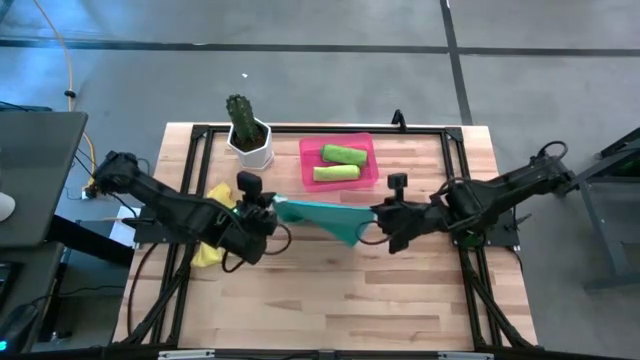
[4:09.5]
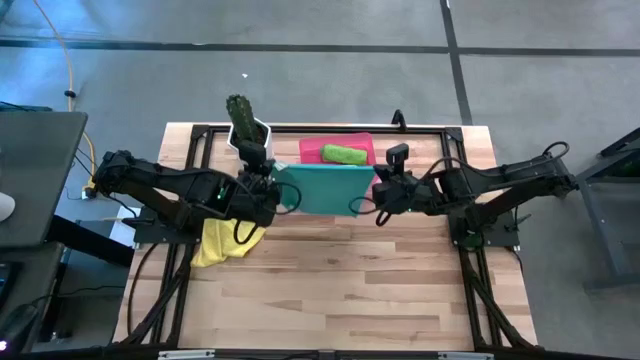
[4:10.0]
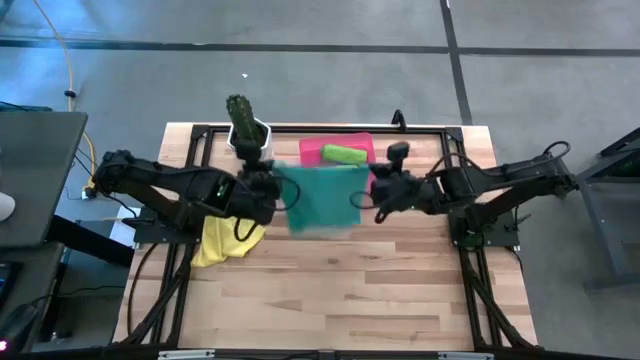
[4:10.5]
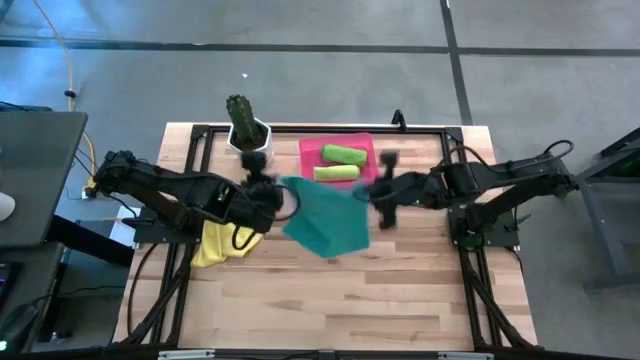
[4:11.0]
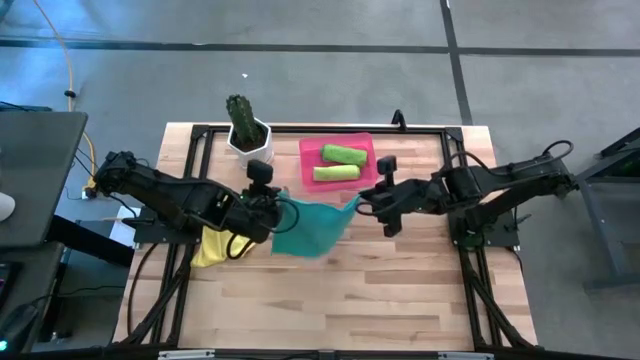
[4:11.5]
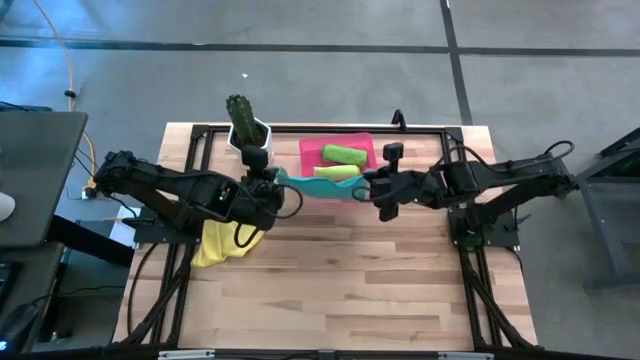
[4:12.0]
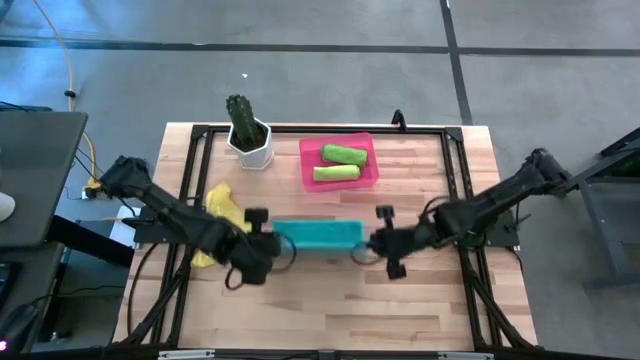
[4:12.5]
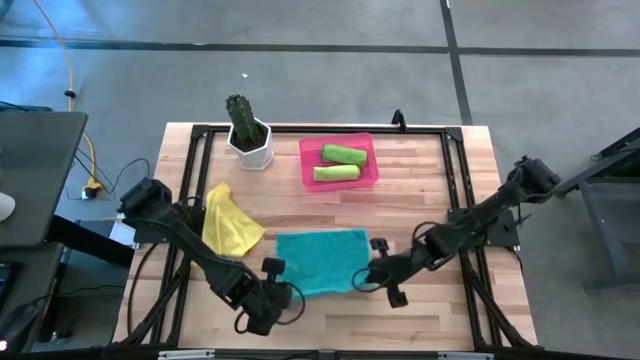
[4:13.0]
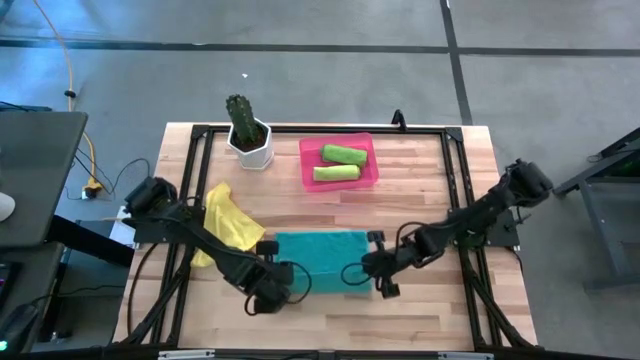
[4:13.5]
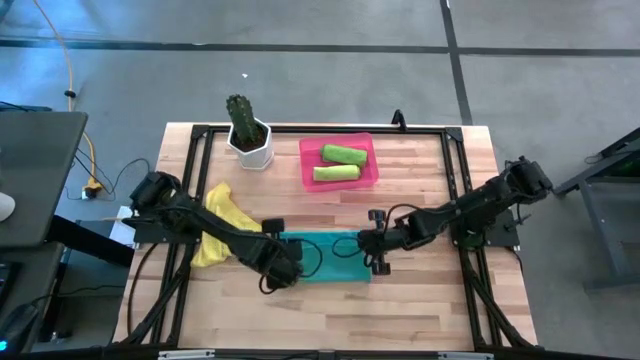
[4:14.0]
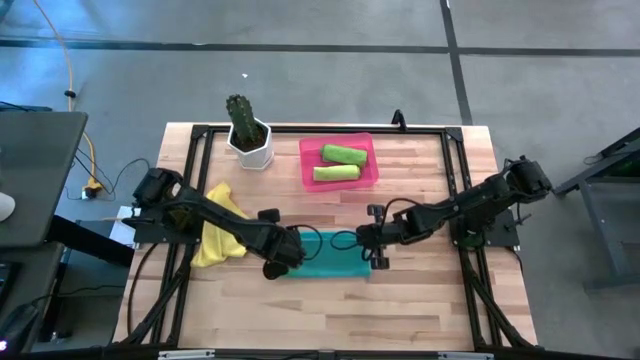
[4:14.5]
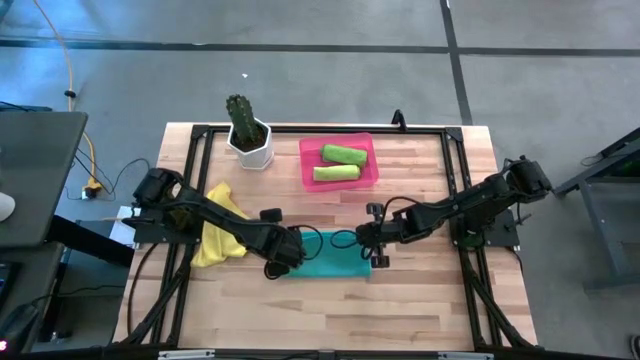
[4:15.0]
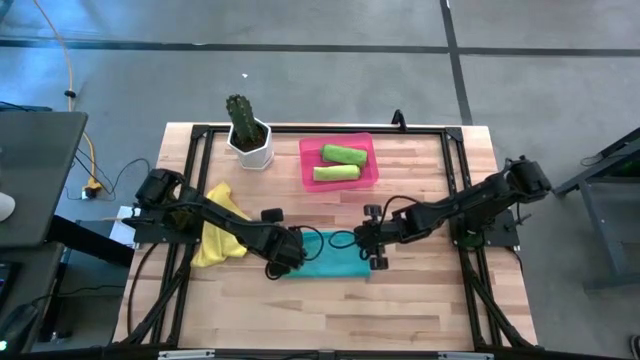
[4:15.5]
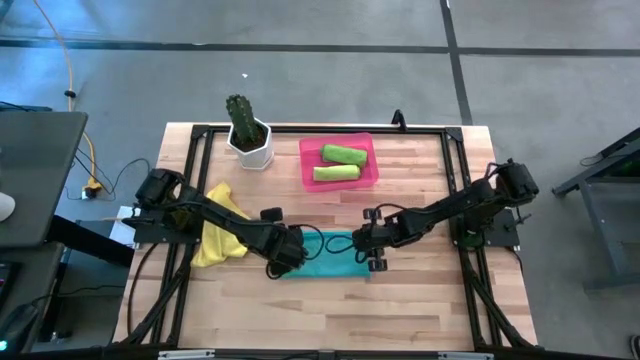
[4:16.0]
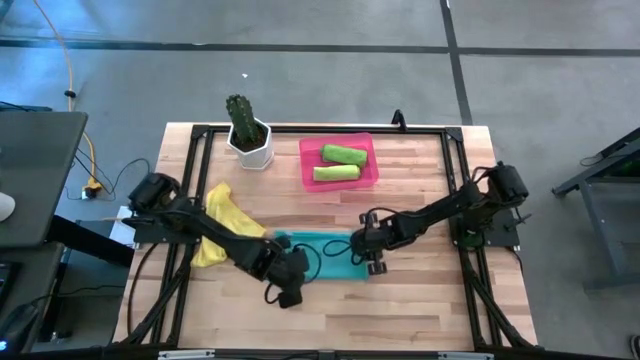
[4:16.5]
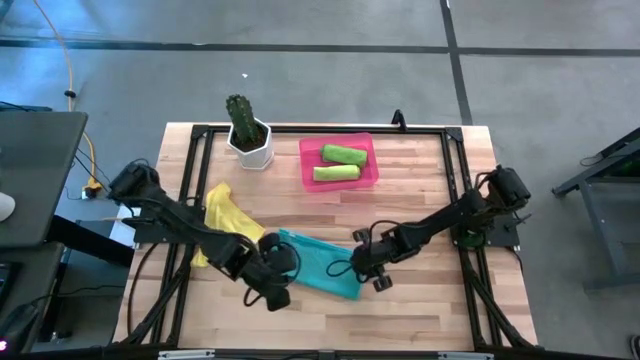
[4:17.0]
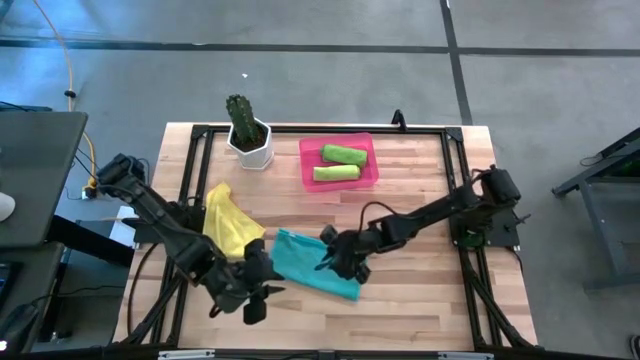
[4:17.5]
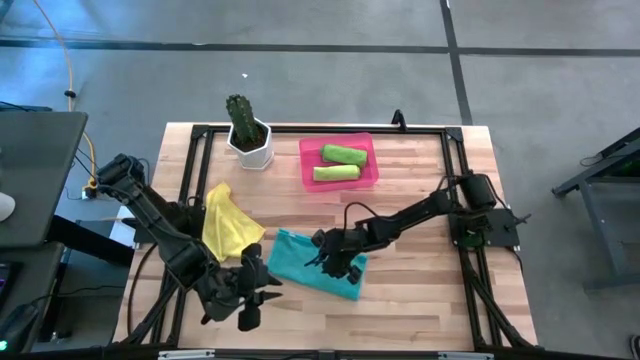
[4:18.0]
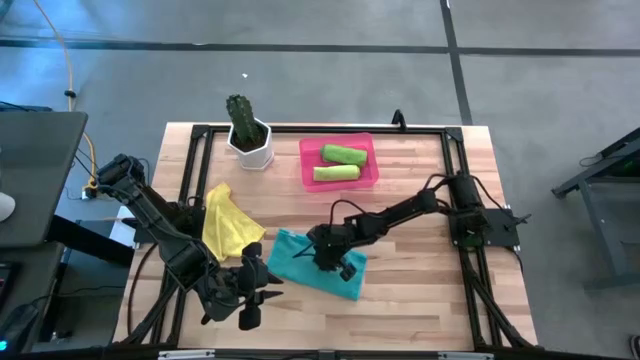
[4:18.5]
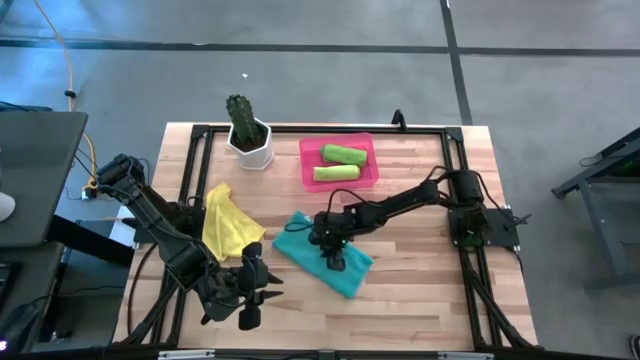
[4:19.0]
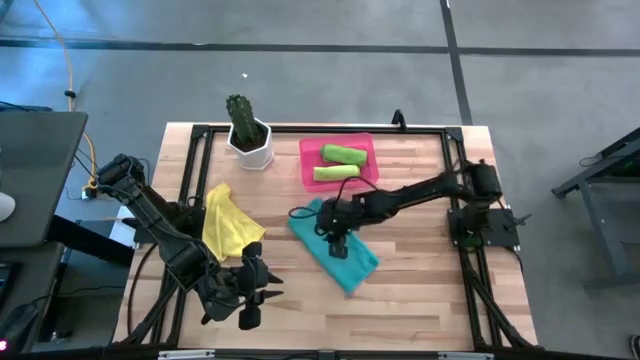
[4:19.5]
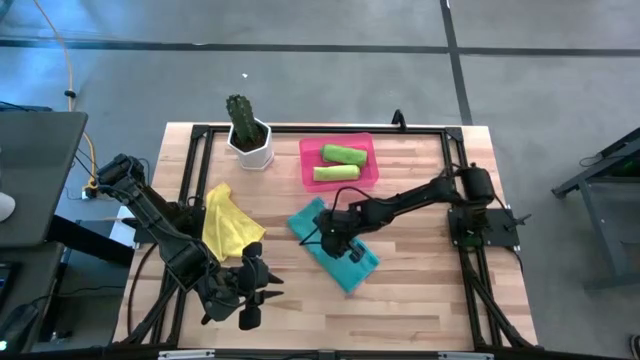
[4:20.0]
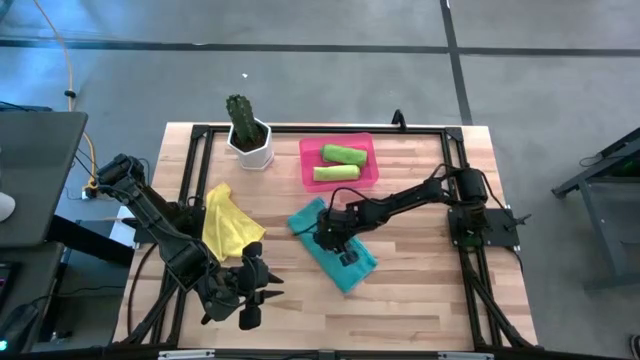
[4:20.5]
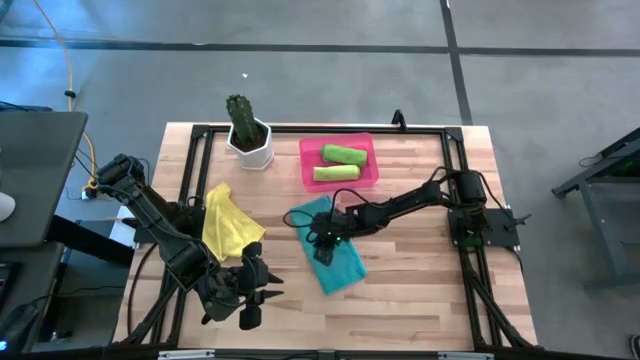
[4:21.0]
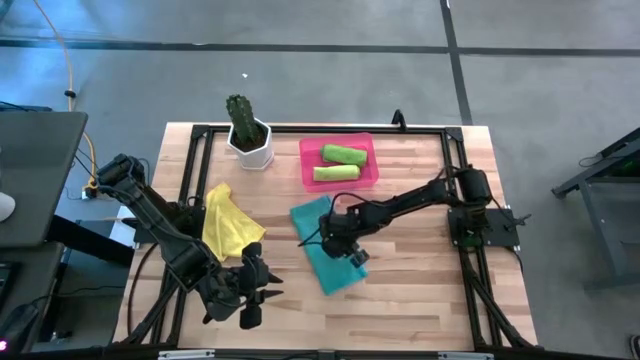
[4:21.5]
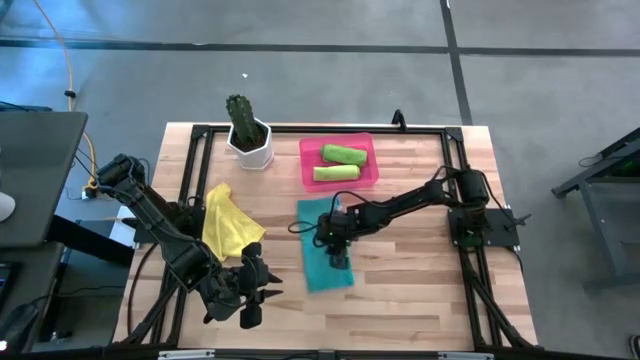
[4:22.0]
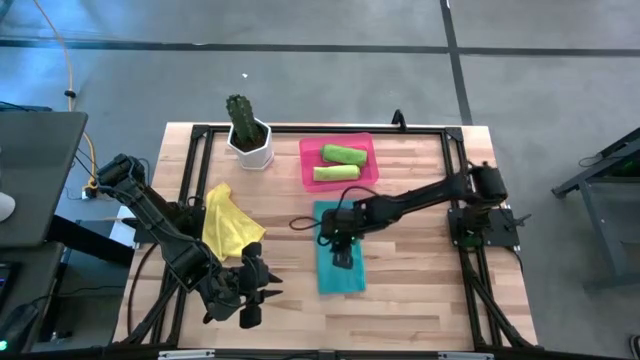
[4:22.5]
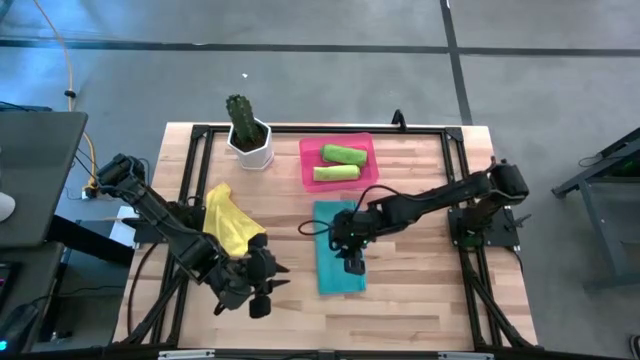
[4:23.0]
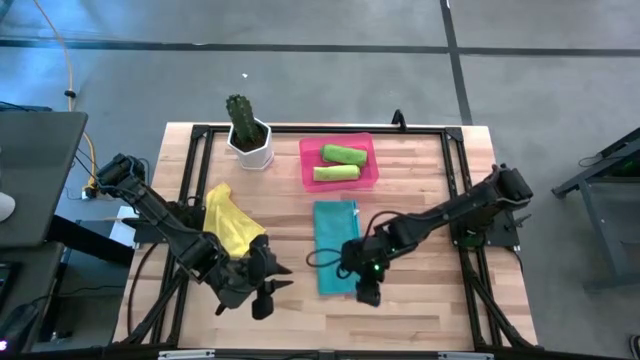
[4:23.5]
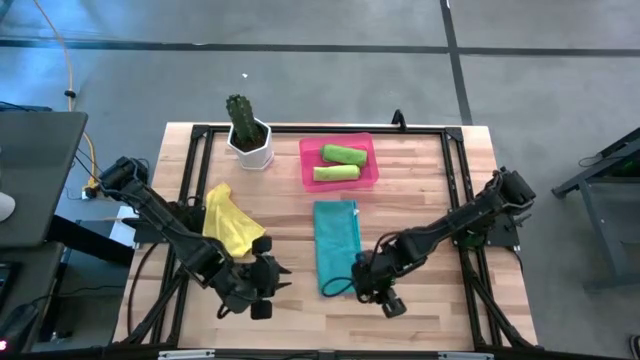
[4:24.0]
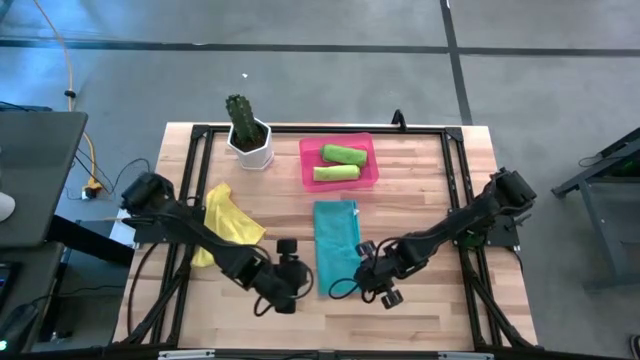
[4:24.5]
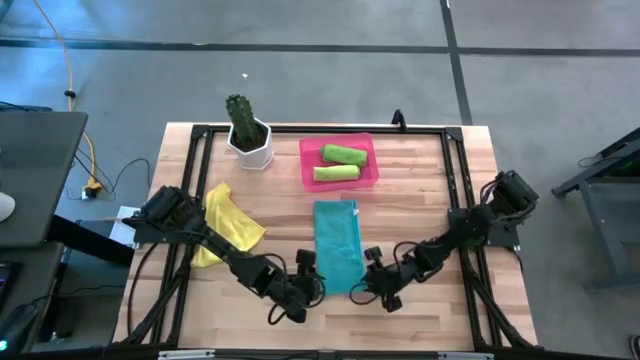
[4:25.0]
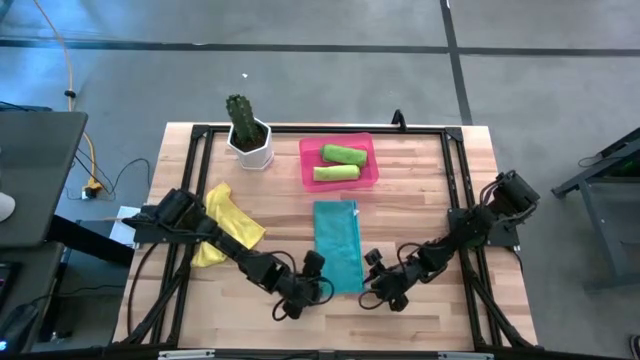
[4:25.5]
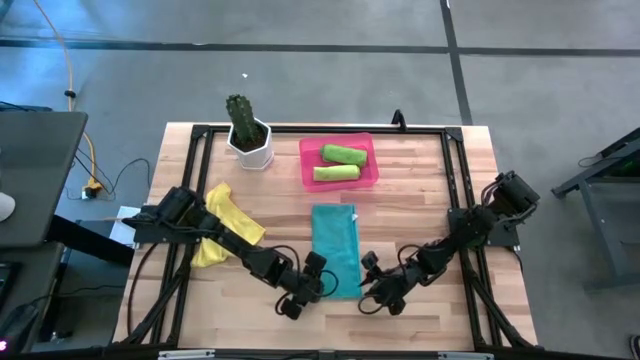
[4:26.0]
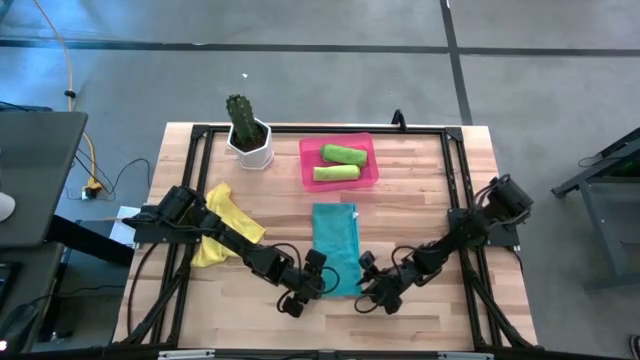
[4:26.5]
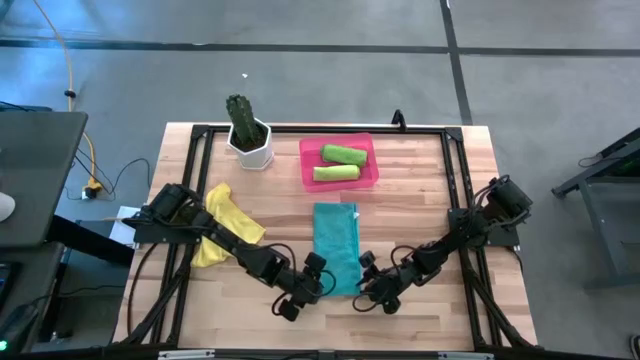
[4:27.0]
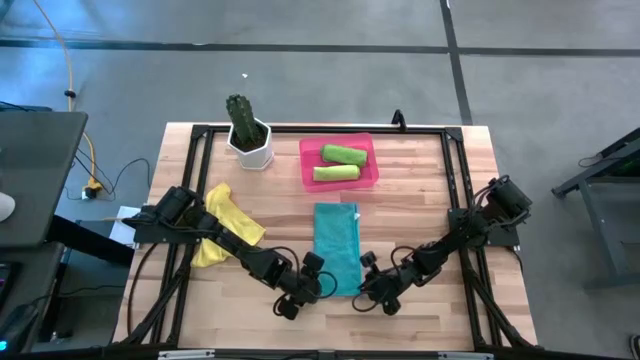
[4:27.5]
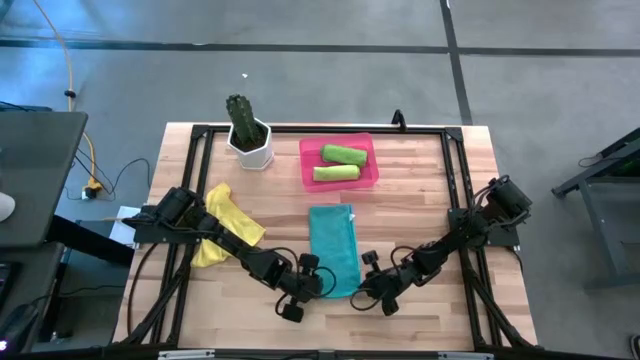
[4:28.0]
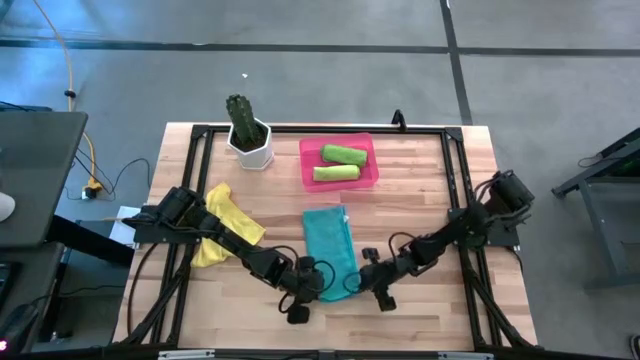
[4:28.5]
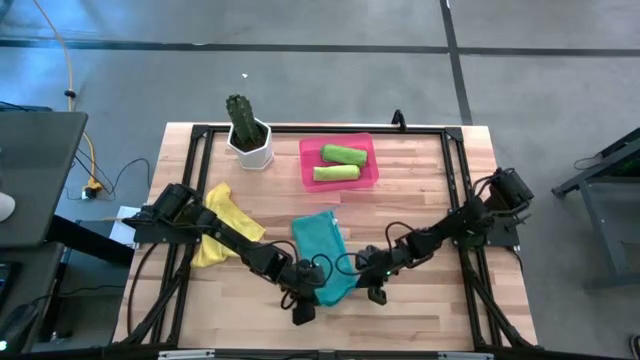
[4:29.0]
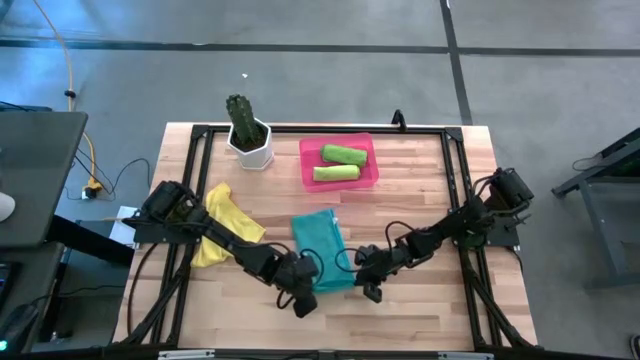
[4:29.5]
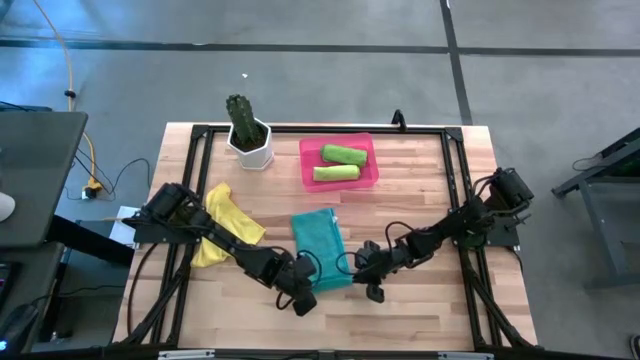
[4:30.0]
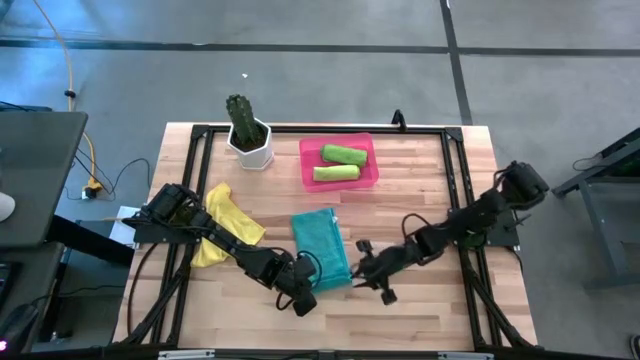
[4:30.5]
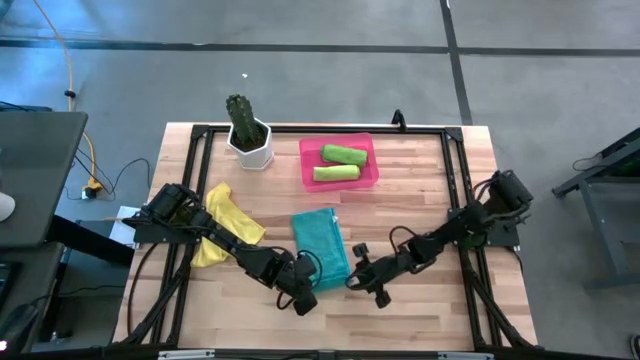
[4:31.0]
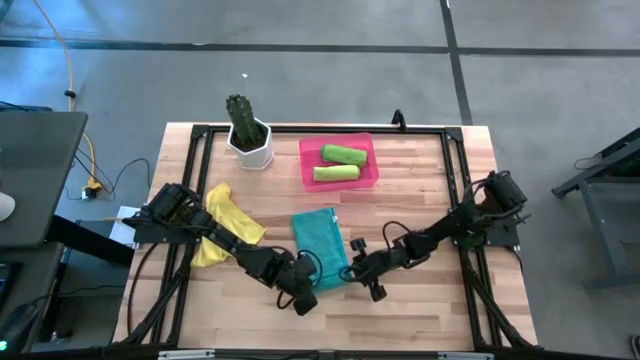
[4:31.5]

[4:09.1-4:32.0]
Task: Roll microfiber towels into tight, uniform cylinder then place into a basket
Roll the blue microfiber cloth
